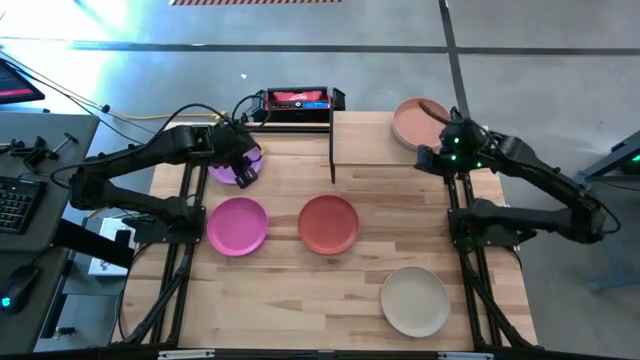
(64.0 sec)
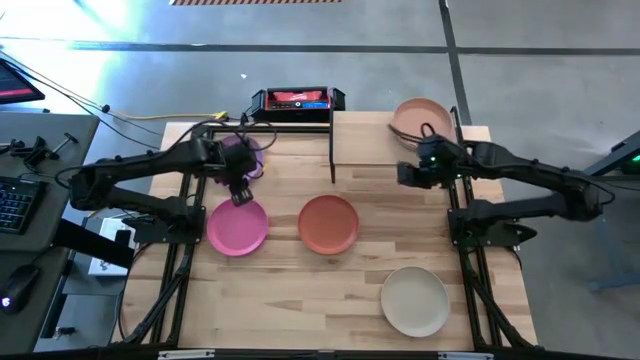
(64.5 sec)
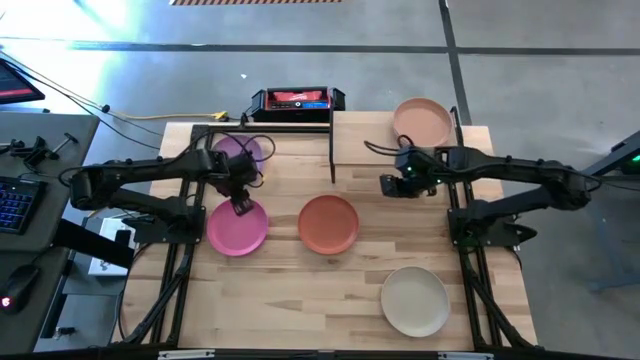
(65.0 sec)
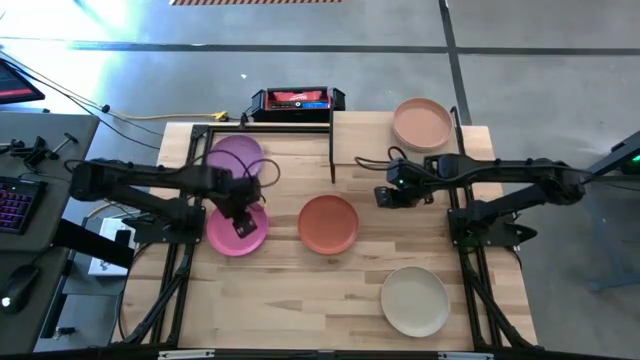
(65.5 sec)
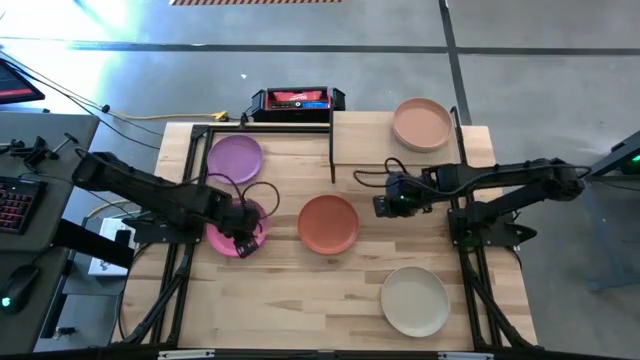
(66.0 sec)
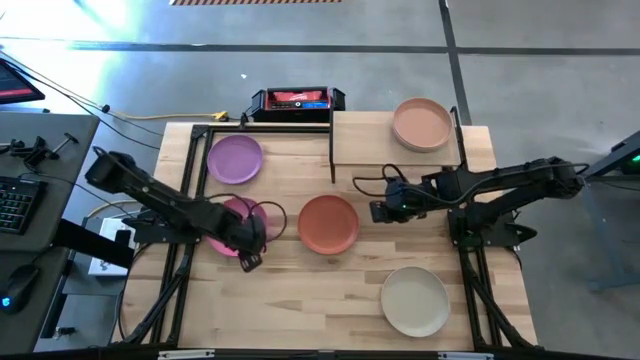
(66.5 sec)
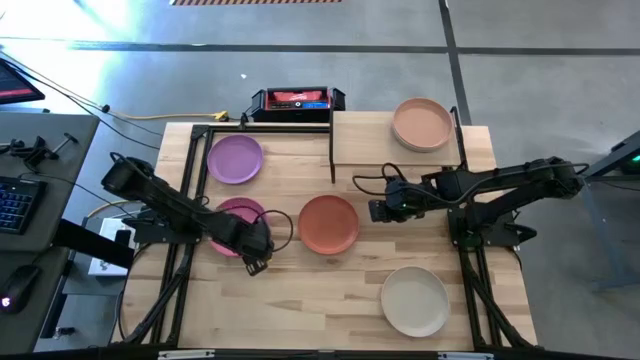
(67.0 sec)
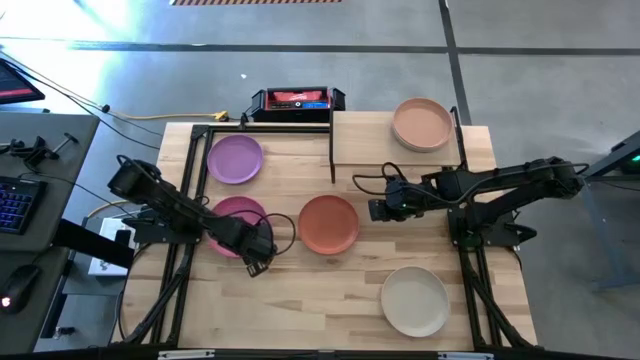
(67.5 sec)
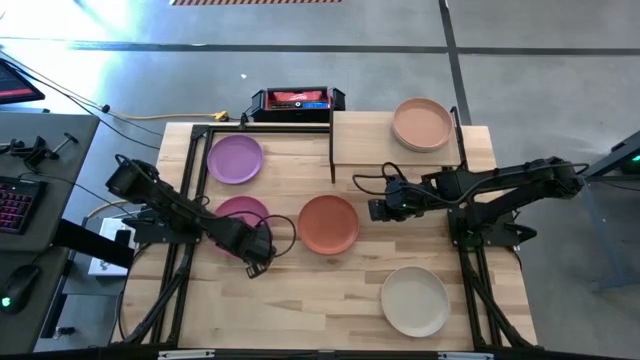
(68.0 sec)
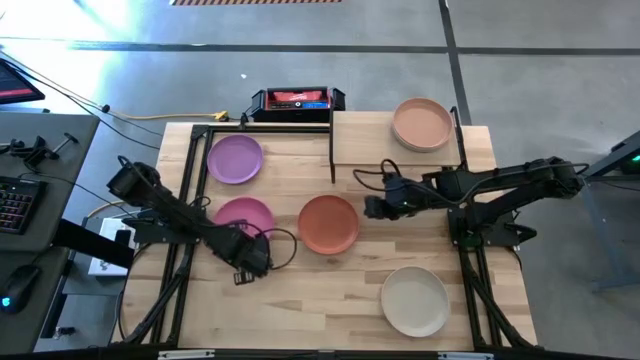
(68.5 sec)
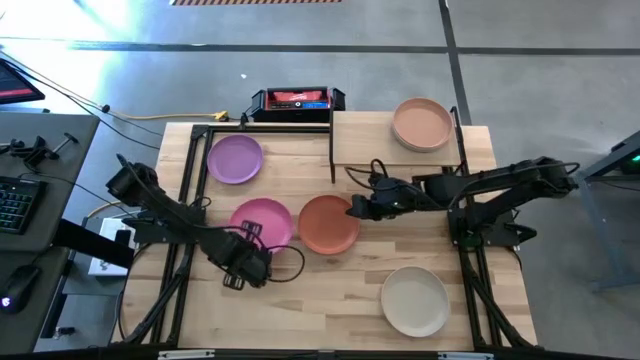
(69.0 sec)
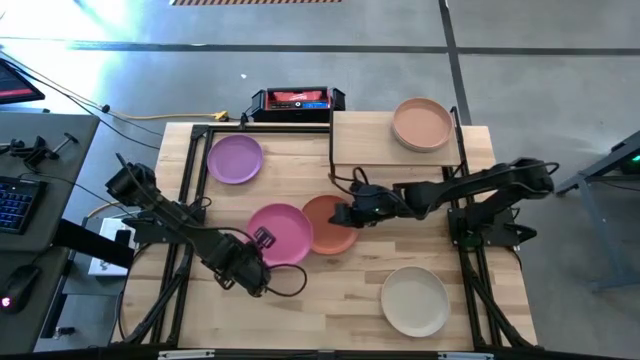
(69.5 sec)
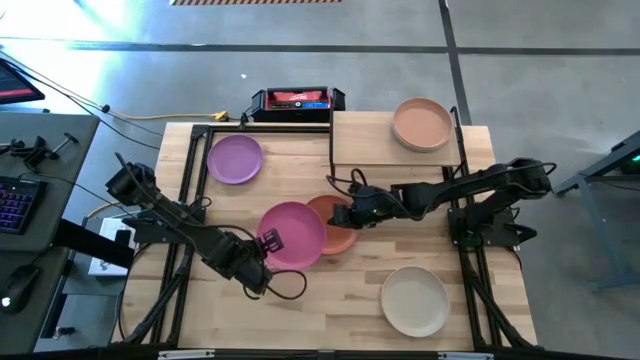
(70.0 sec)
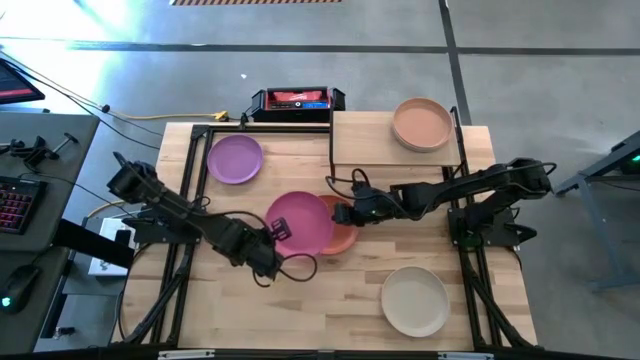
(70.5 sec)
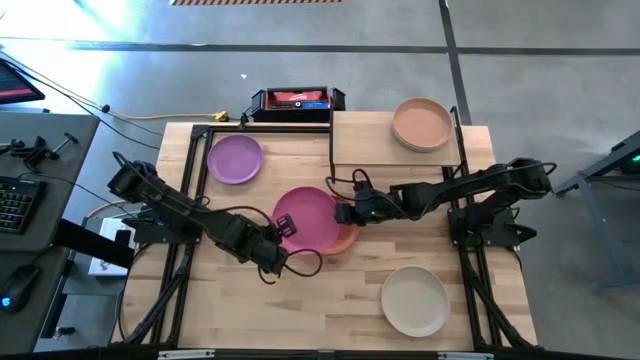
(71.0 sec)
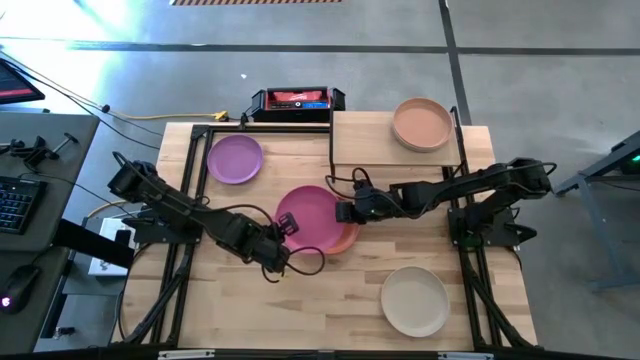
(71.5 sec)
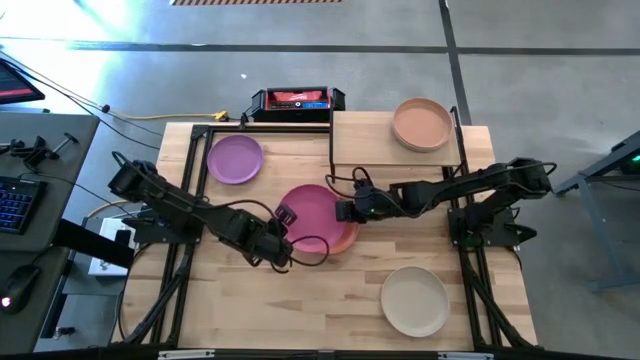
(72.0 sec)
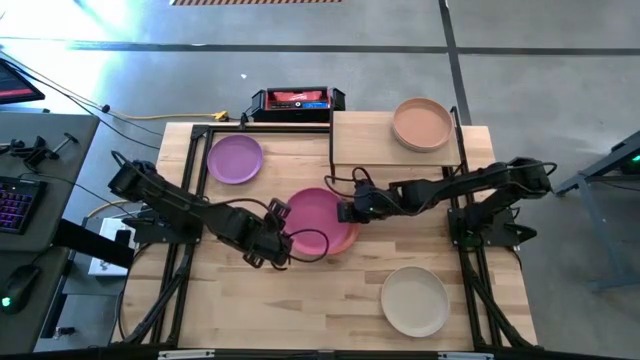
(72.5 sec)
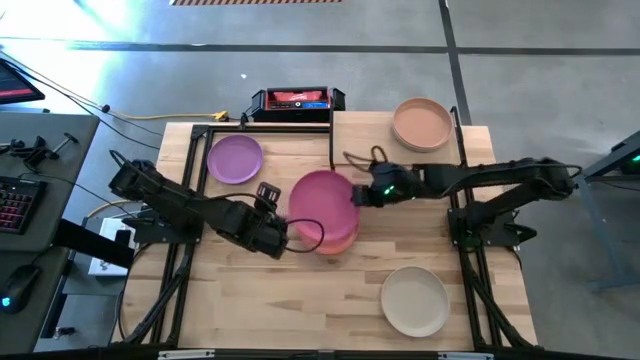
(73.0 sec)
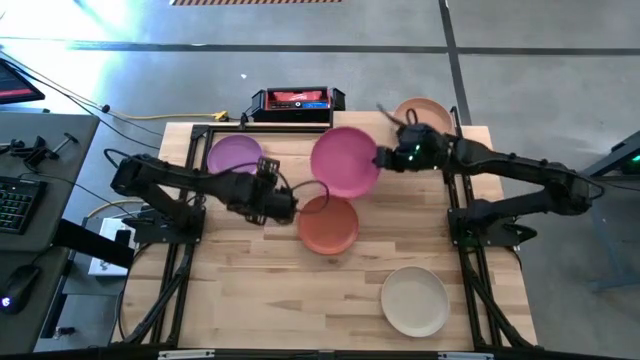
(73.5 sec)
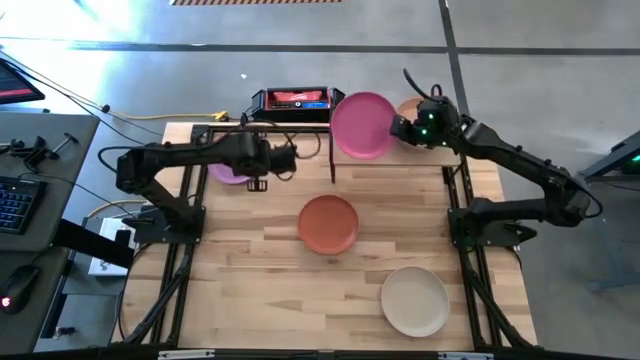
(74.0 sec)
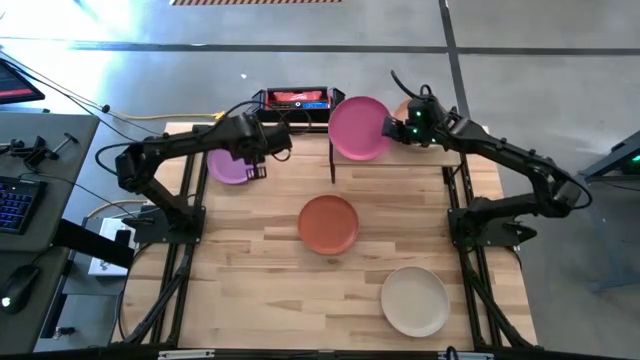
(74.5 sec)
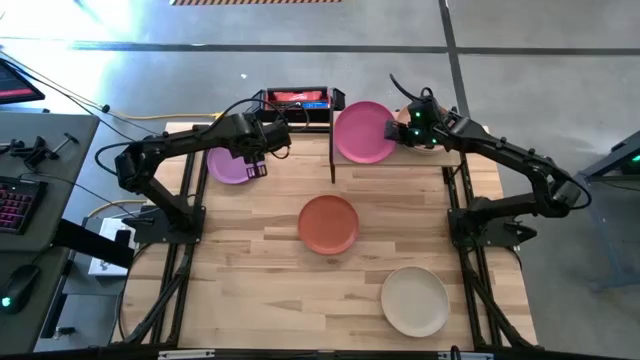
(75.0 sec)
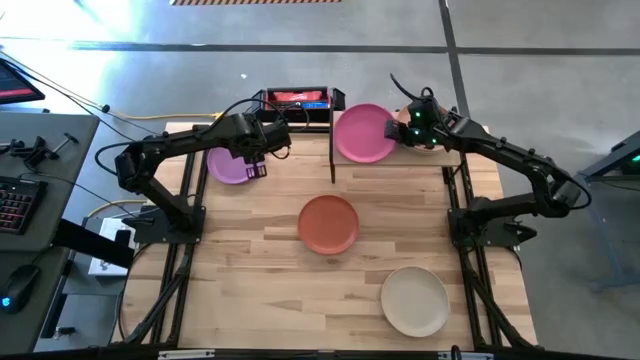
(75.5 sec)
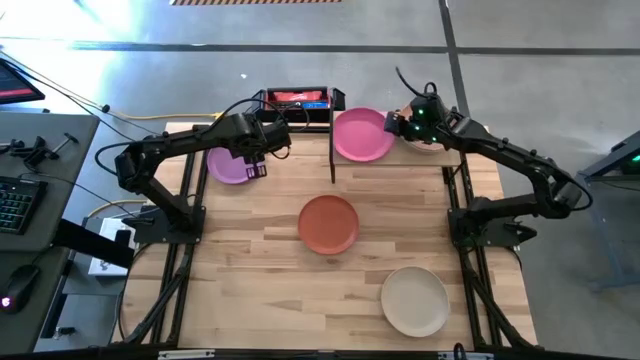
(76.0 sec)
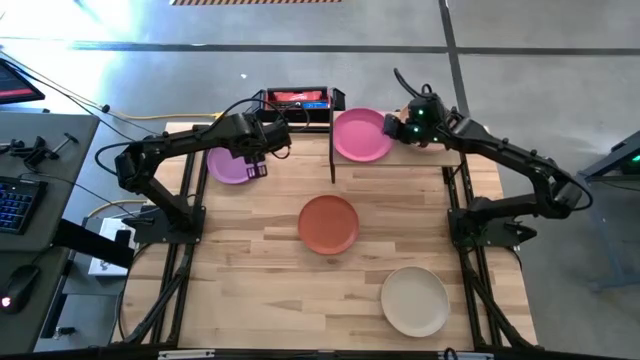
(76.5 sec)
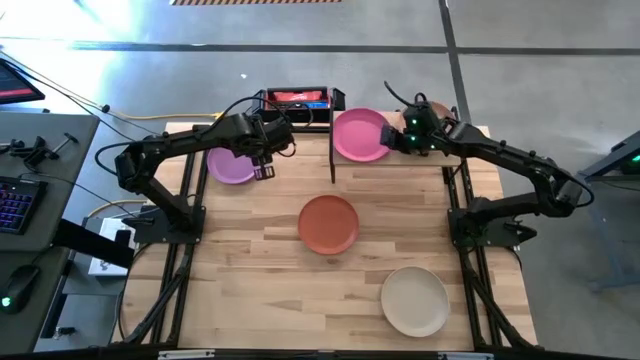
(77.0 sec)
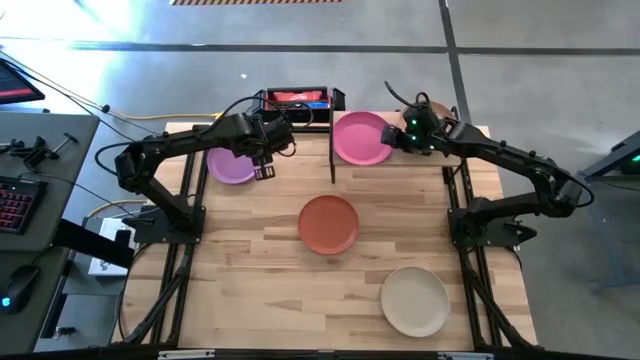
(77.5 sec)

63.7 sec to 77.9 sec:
Task: Place and stack plates onto a shelf
Put the pink plate on the shelf

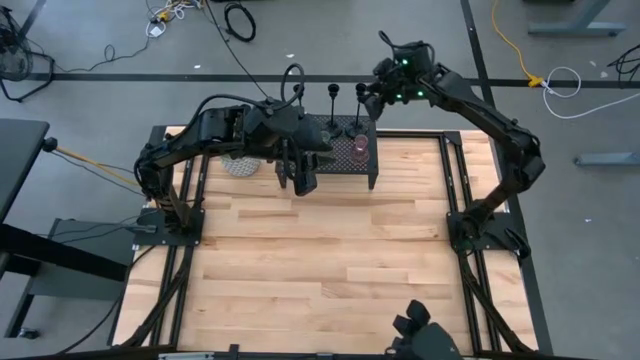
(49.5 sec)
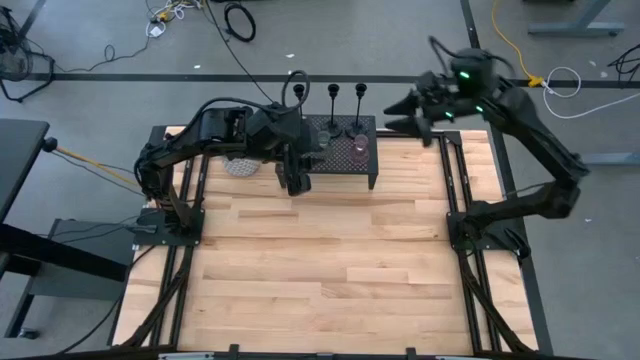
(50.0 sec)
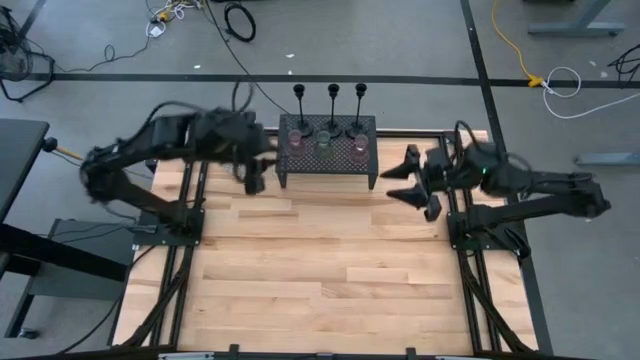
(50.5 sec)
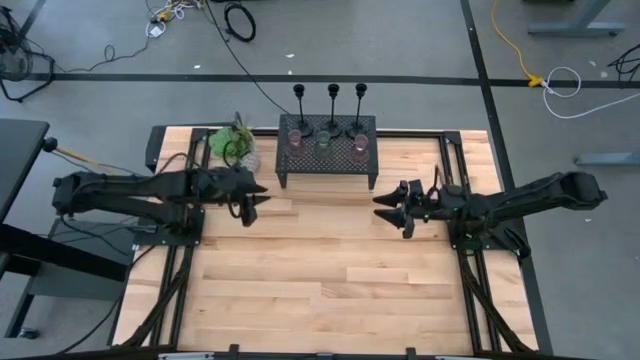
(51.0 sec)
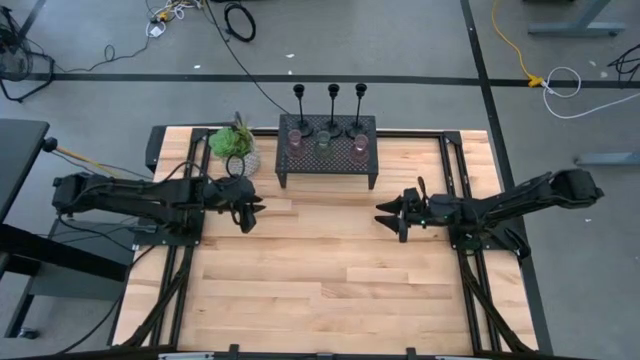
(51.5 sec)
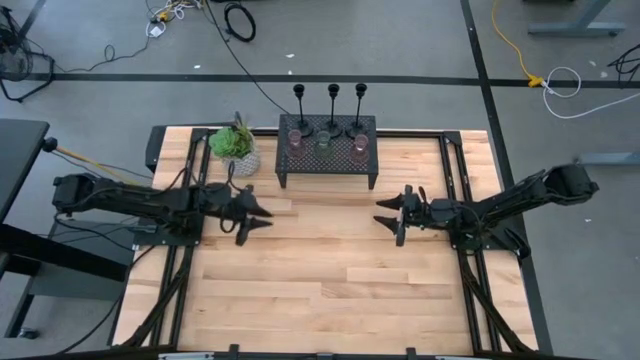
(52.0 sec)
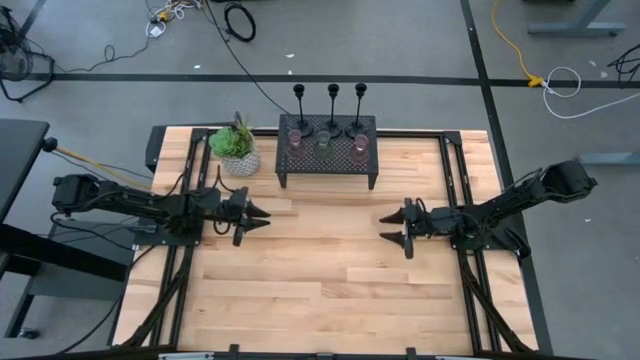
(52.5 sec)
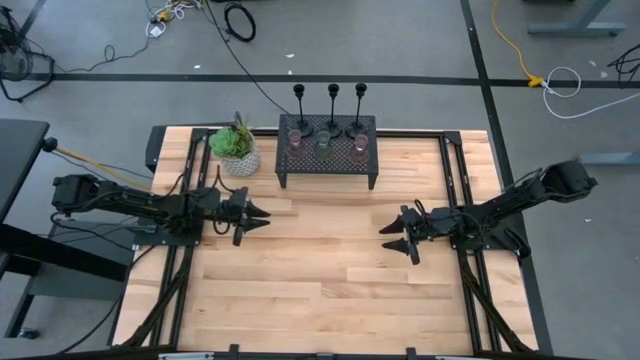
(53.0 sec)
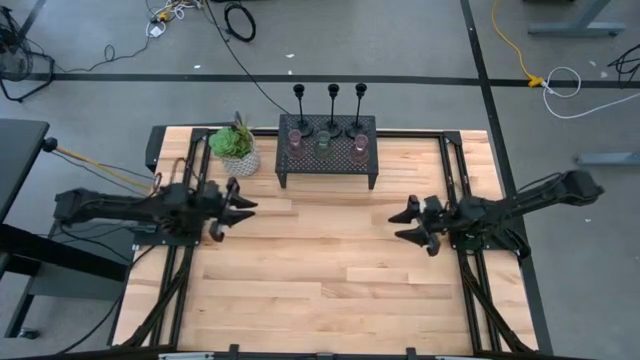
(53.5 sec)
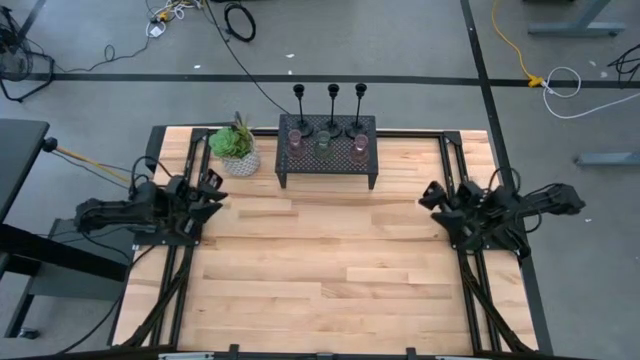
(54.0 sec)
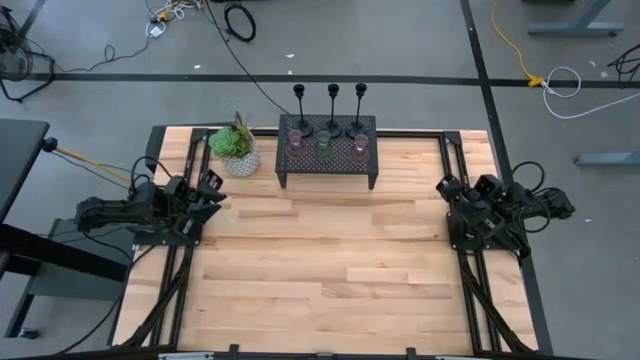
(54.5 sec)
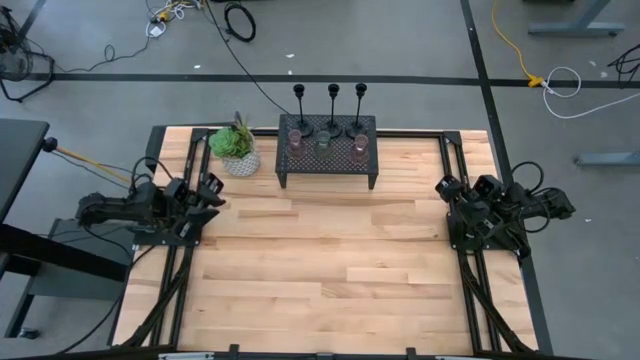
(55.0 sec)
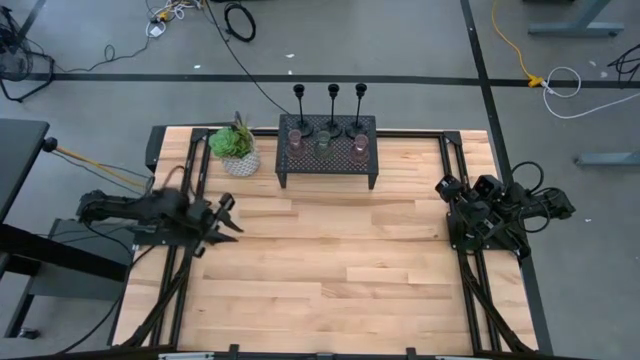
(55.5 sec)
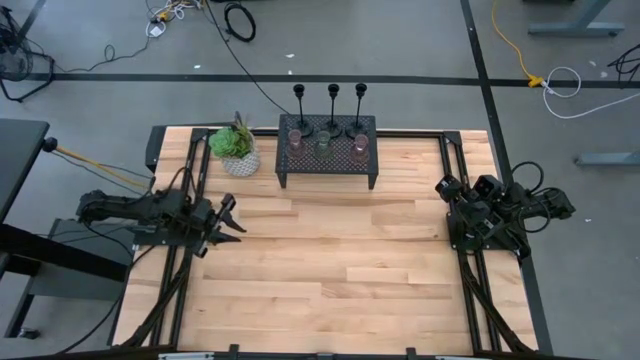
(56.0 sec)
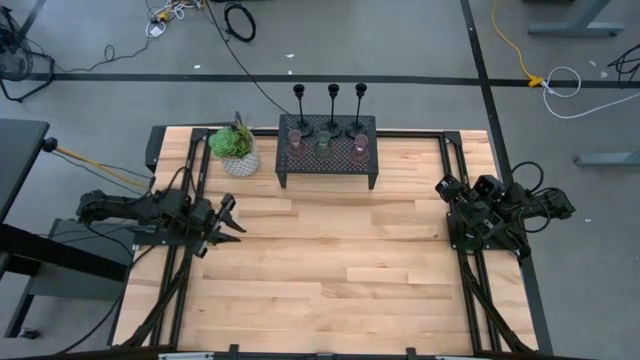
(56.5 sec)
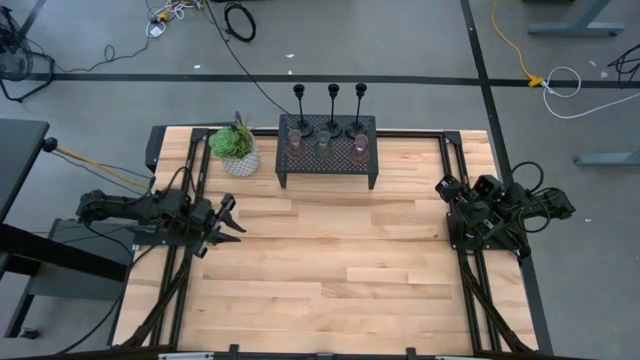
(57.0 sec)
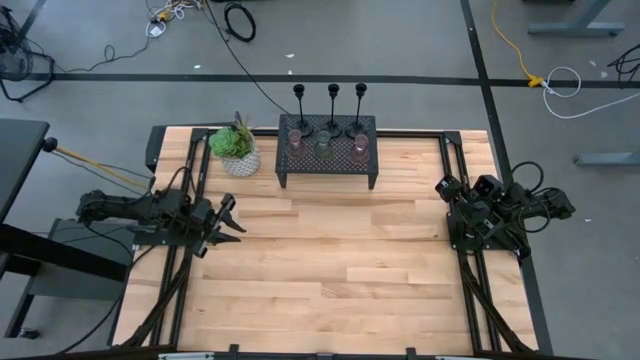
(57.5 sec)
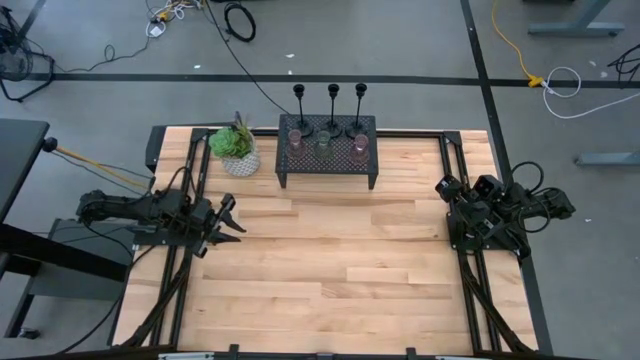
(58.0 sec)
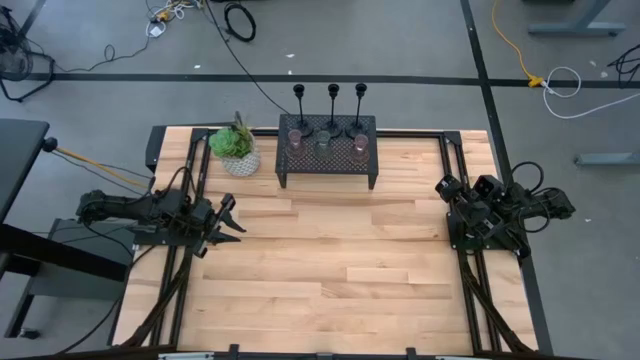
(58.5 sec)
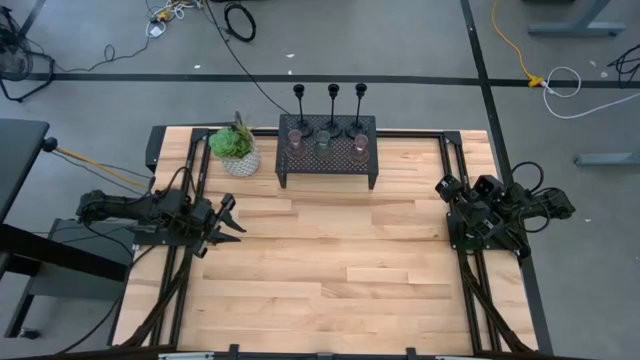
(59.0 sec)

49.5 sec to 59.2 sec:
Task: Pick & Place candle stick holders
Return to Home Position
